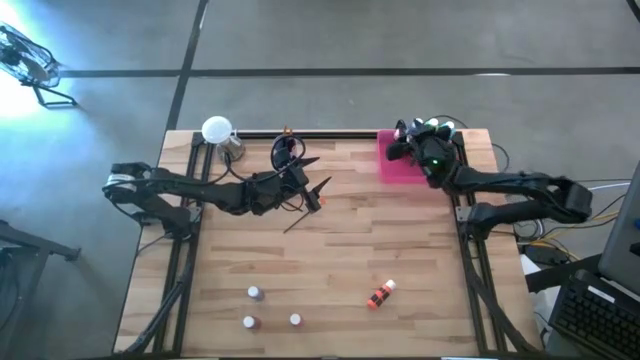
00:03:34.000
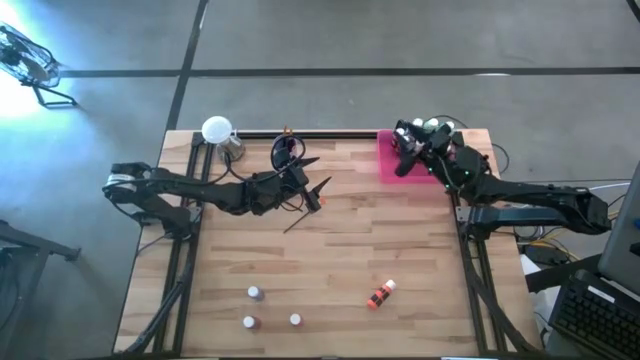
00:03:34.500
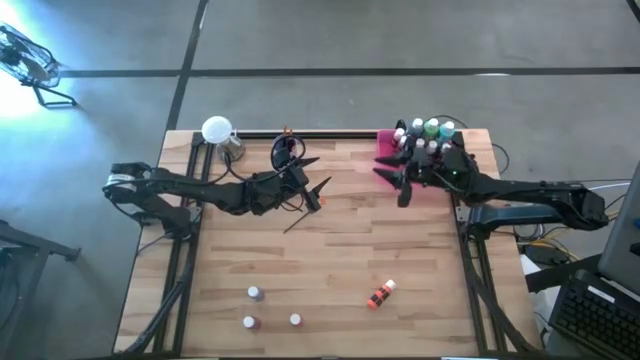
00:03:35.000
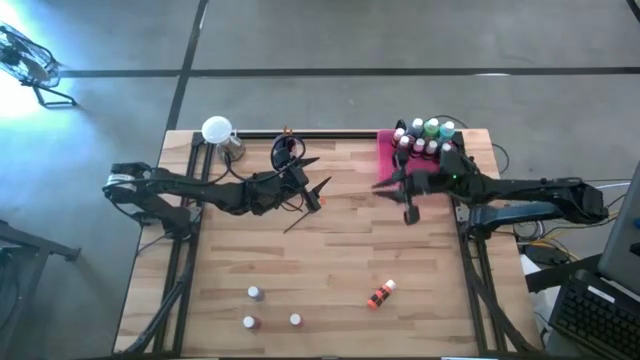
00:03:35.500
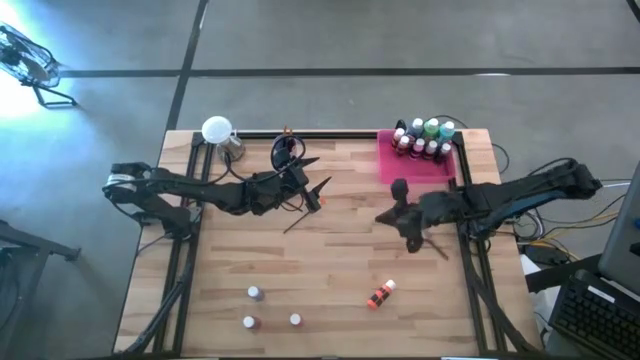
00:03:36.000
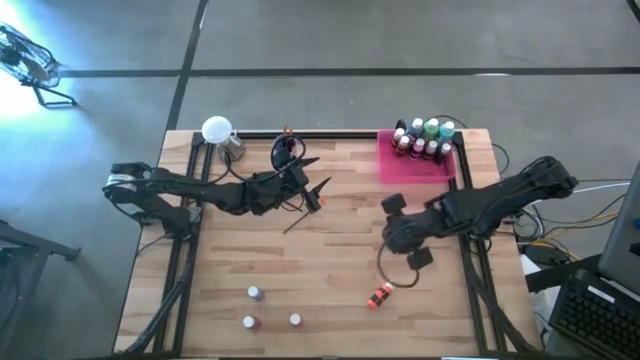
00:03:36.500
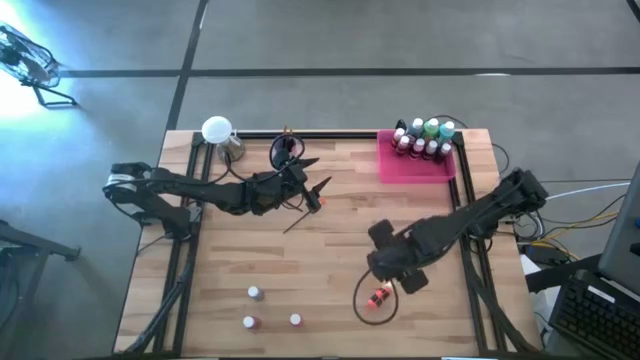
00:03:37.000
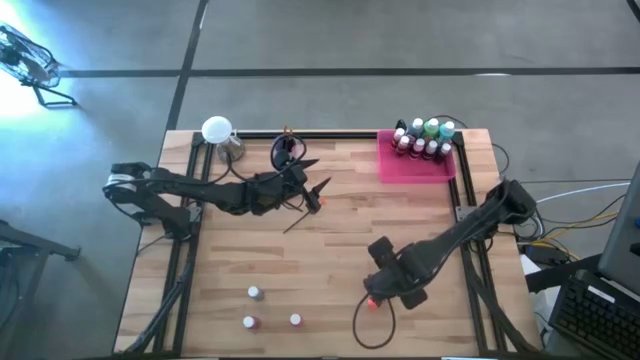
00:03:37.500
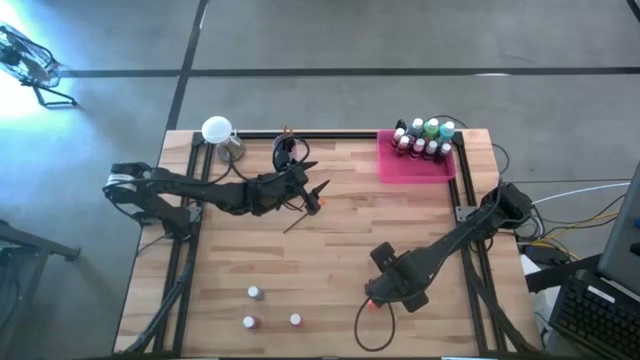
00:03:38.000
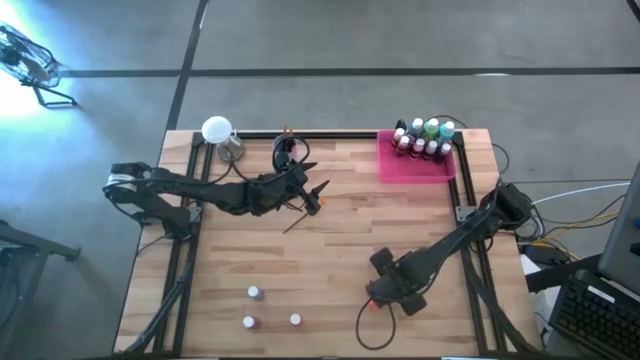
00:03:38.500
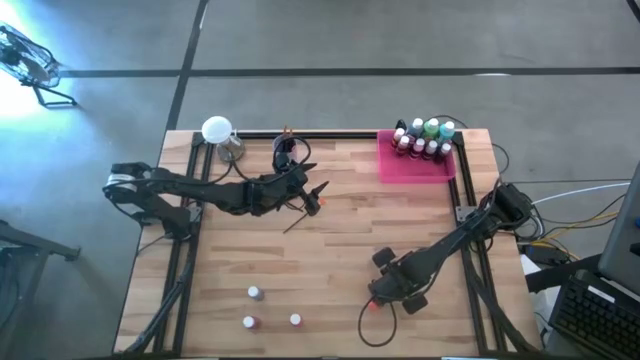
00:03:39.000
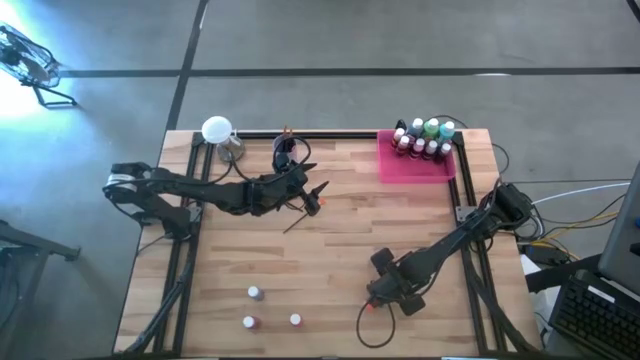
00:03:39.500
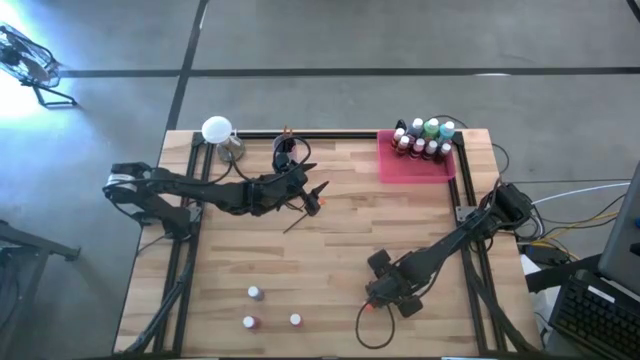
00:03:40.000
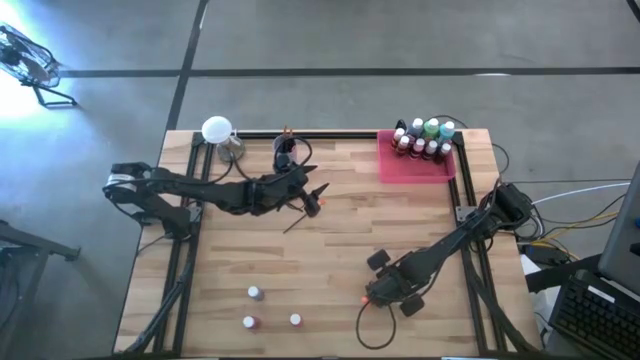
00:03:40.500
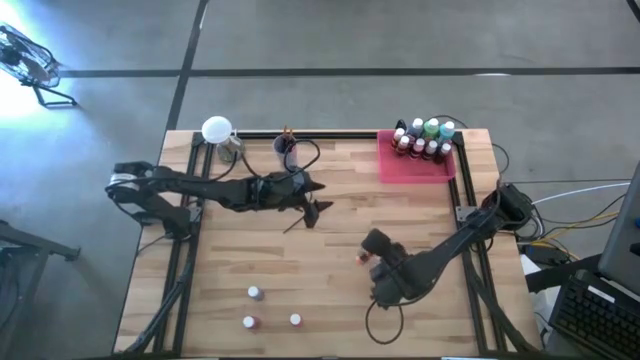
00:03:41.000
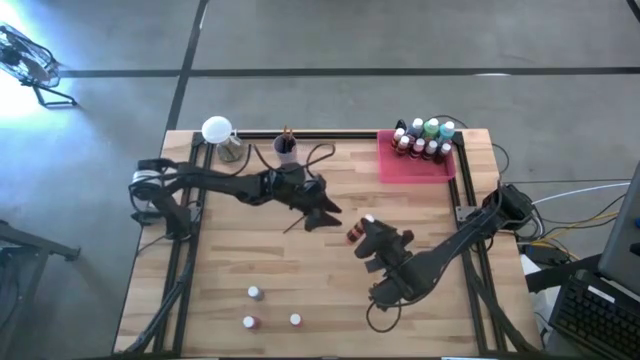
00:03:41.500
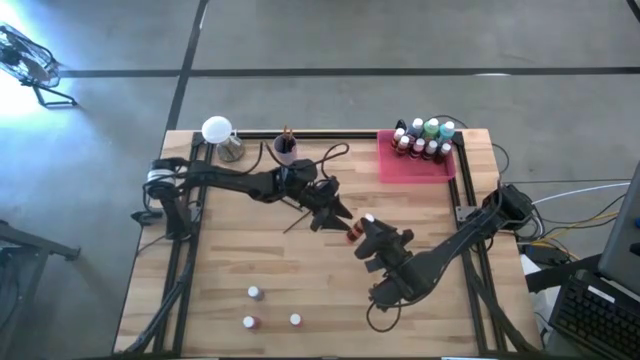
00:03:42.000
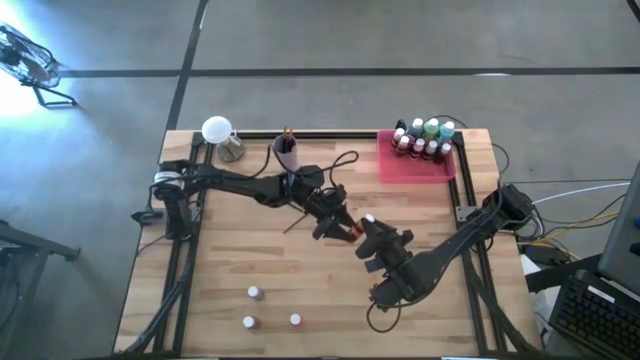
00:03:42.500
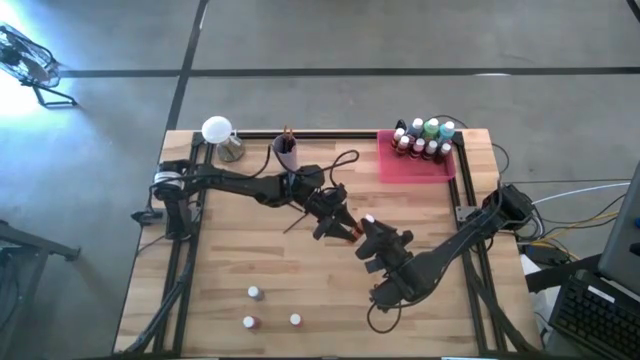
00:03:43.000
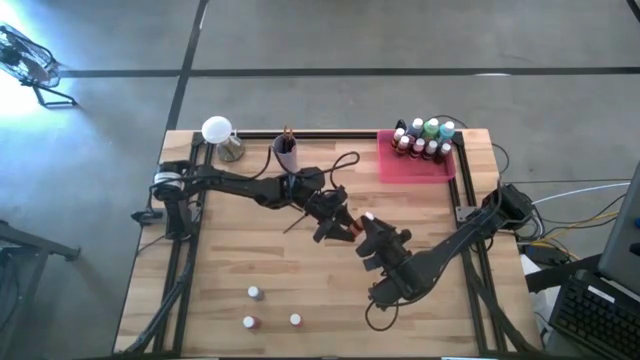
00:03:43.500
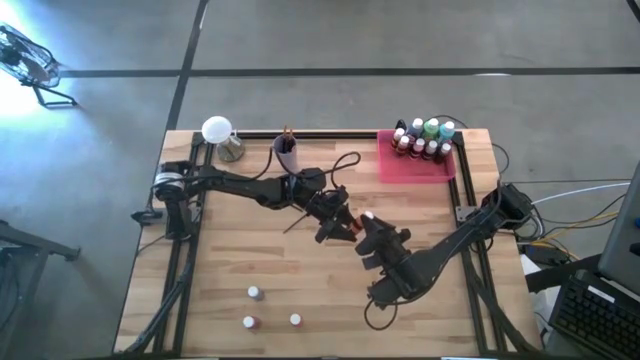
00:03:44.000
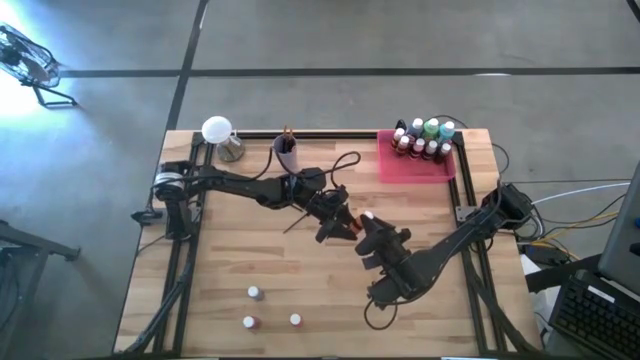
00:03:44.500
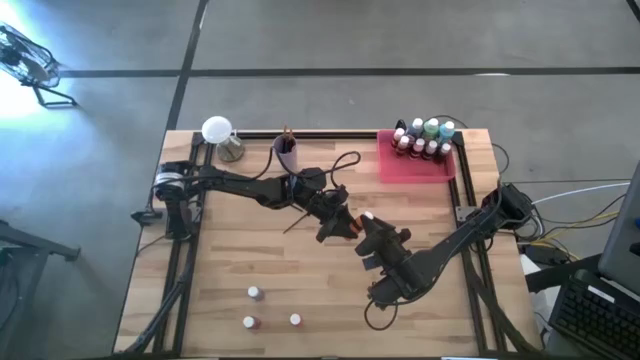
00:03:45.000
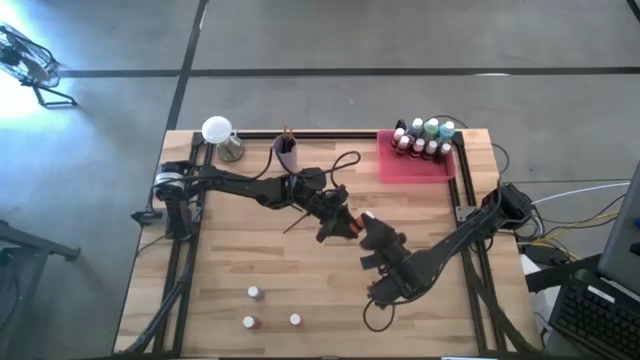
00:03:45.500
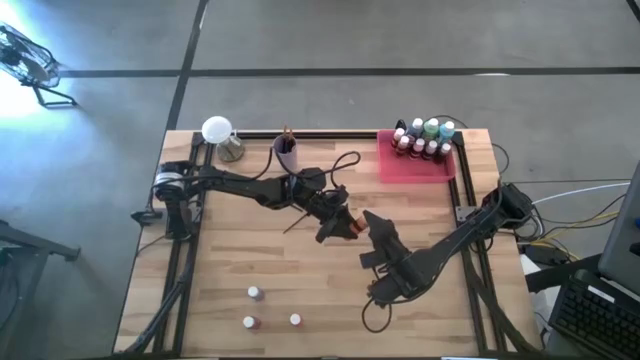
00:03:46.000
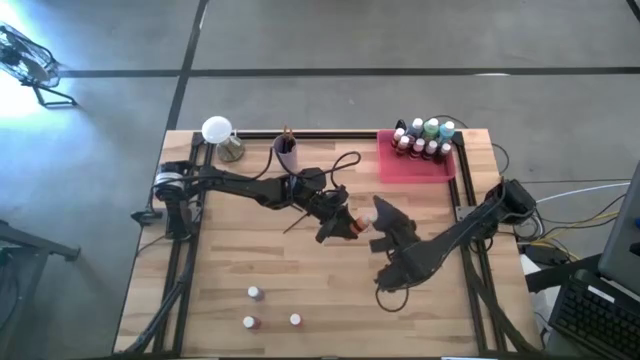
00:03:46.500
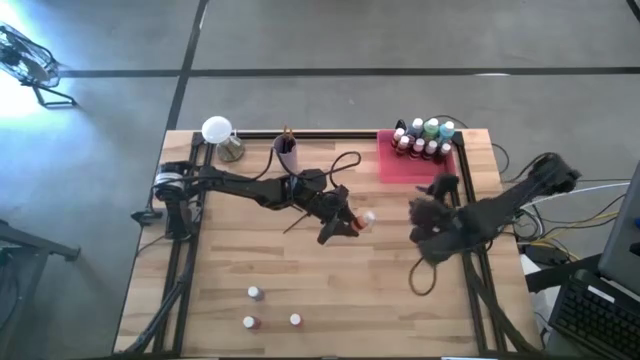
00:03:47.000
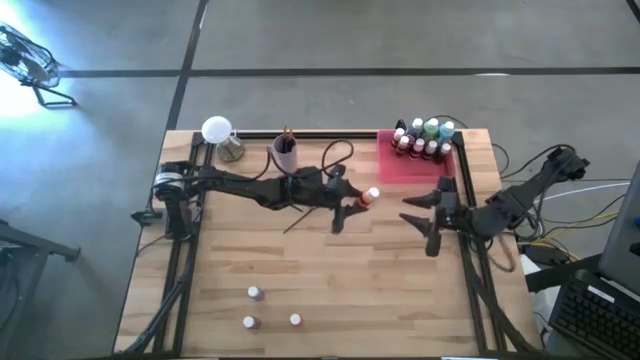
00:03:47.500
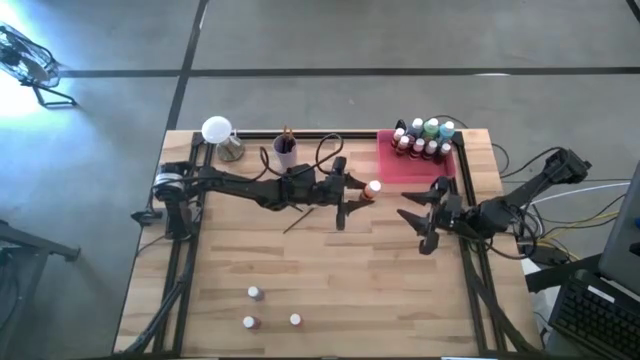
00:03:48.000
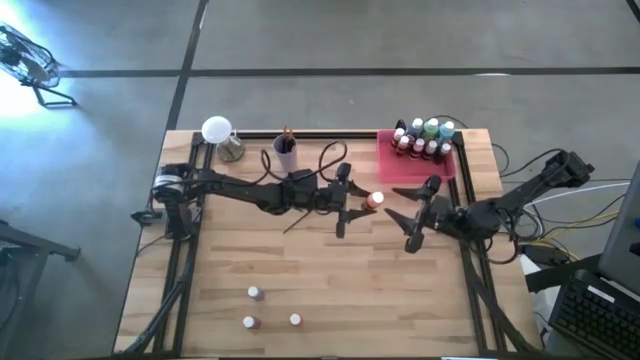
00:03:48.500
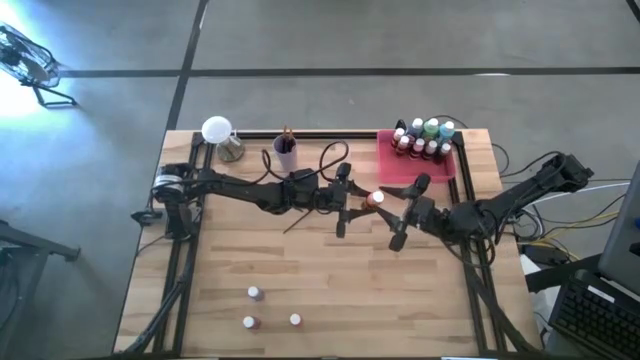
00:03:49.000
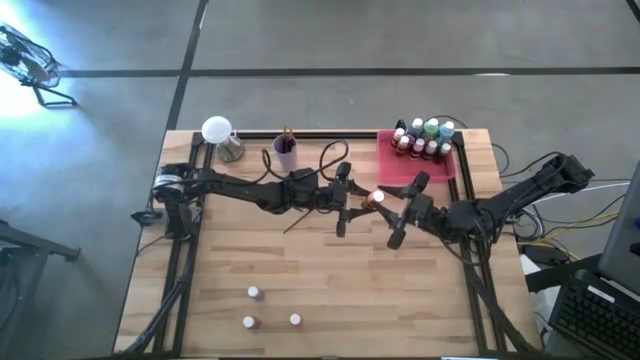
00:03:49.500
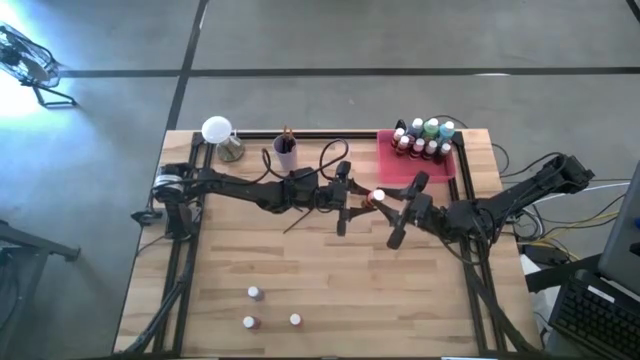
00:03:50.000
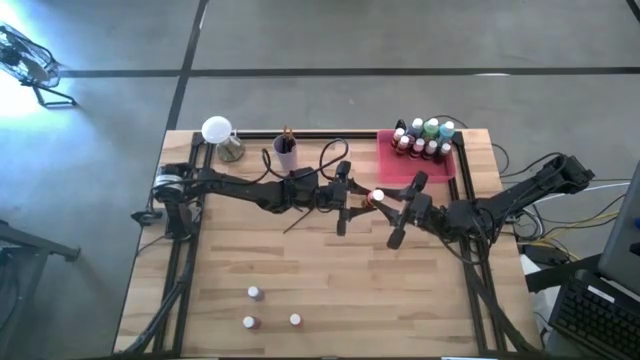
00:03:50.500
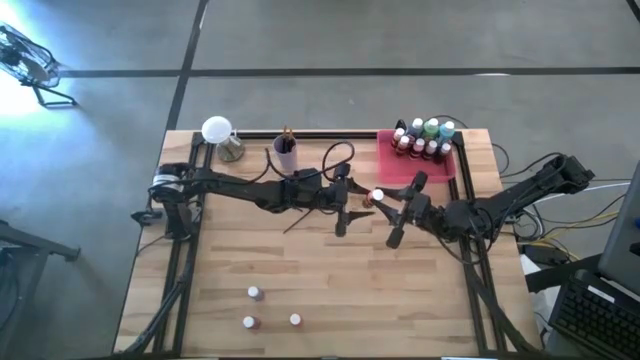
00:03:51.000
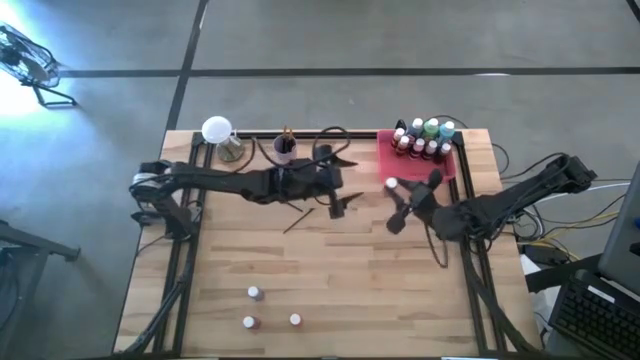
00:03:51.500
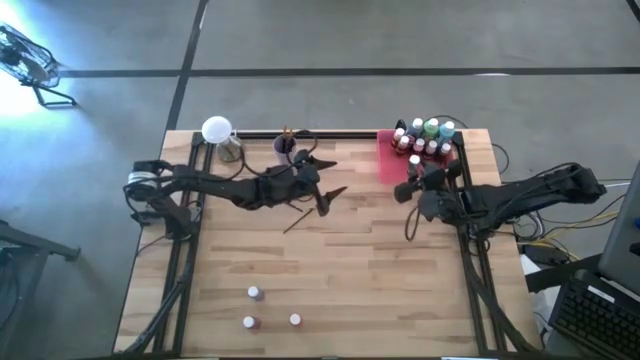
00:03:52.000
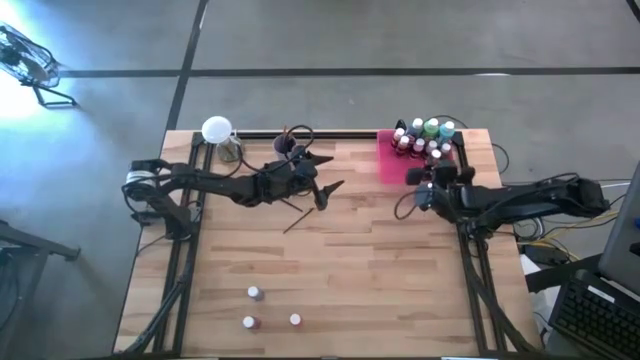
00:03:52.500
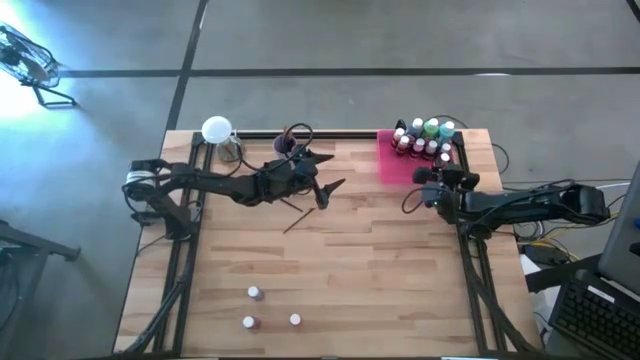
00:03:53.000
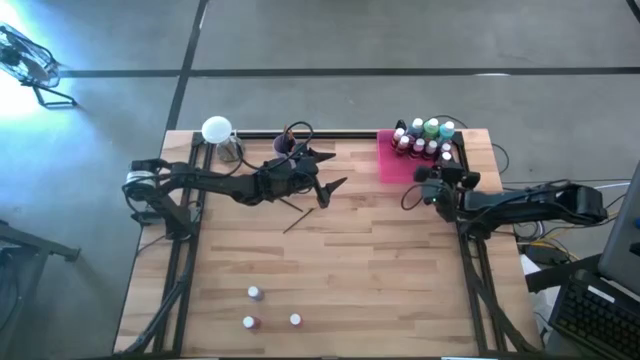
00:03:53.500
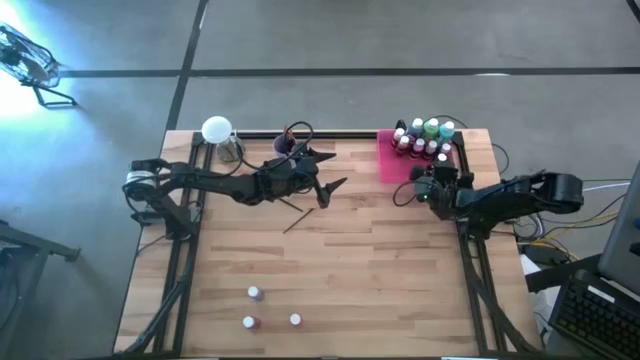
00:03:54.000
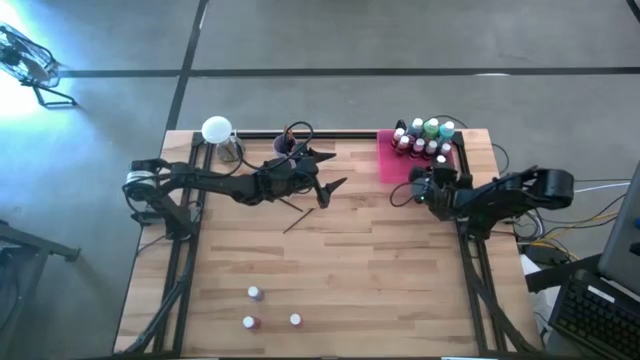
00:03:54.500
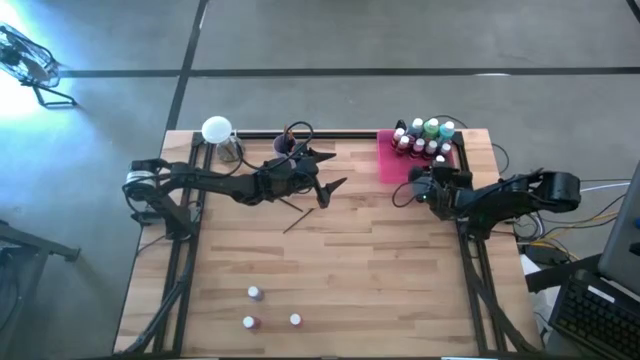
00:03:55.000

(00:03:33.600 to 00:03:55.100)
Task: Pick & Place Paint Supplies
Put the small orange paint bottle into the pink bin

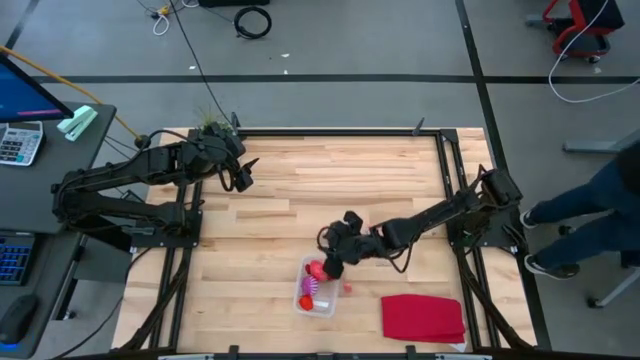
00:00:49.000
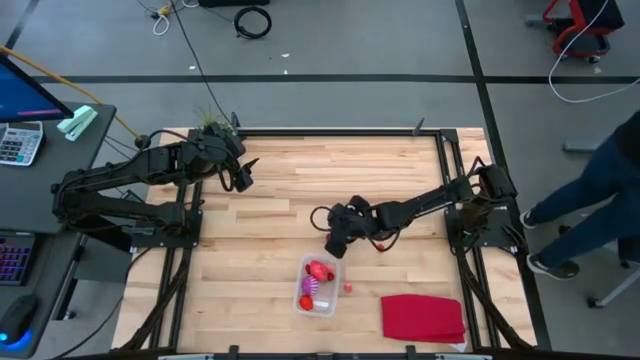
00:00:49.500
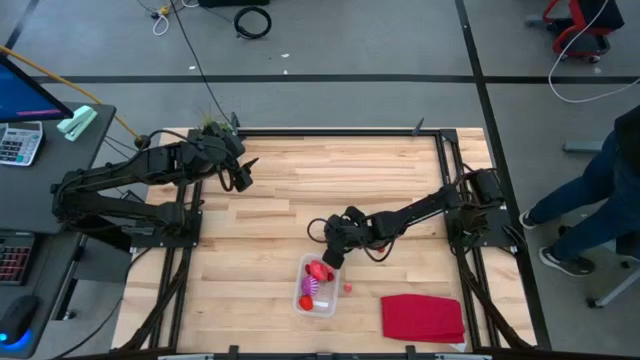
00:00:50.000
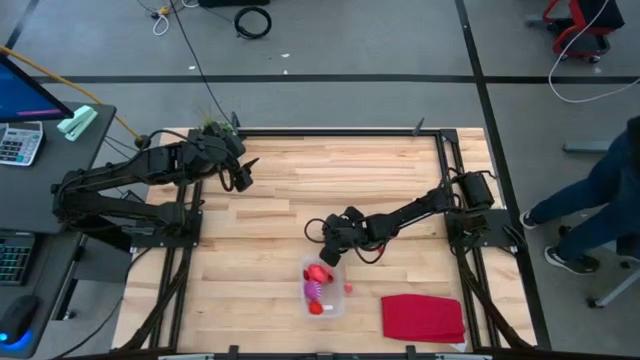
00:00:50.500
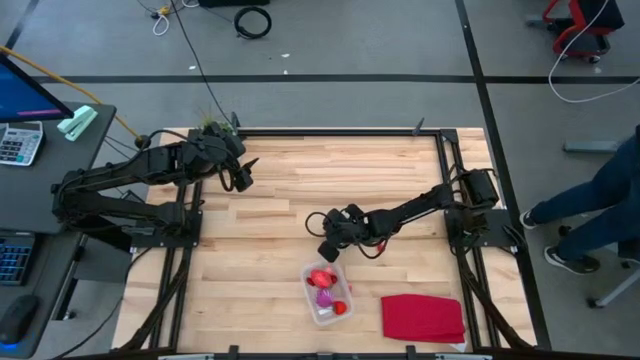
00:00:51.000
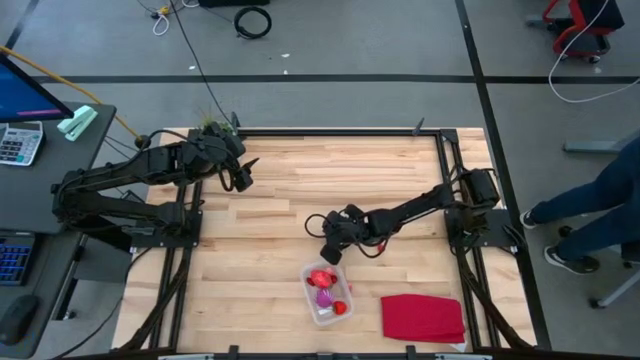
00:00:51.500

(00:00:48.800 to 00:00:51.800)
Task: Pick and placing Produce into tupperware
Put the left red cherry into the transparent bin
